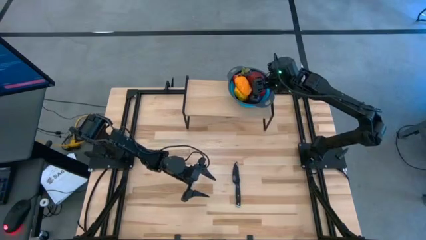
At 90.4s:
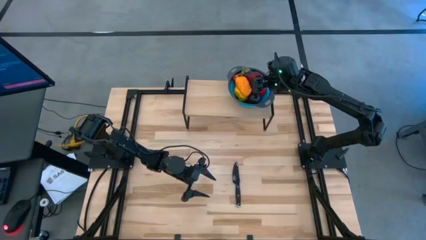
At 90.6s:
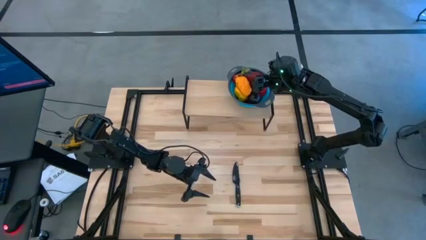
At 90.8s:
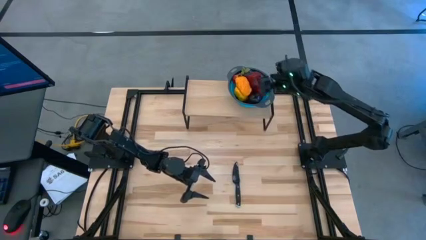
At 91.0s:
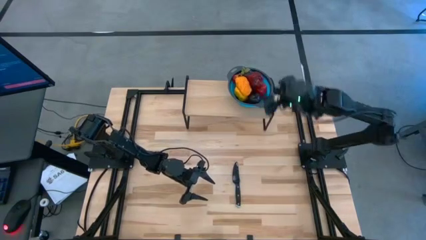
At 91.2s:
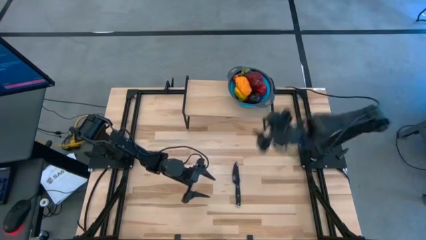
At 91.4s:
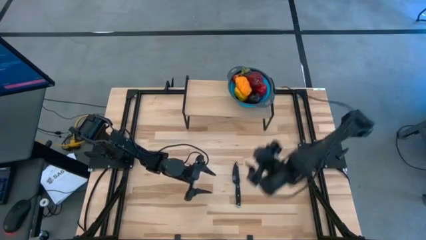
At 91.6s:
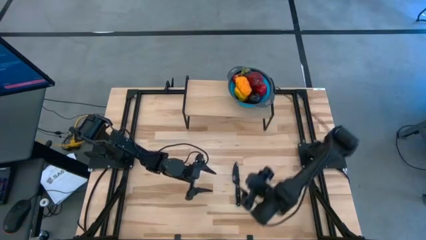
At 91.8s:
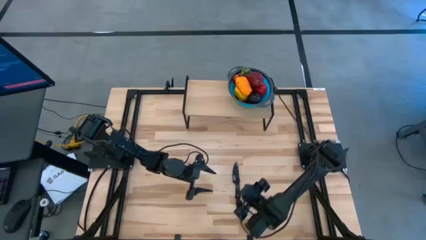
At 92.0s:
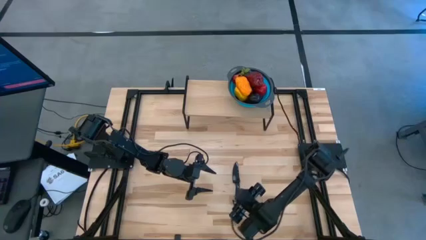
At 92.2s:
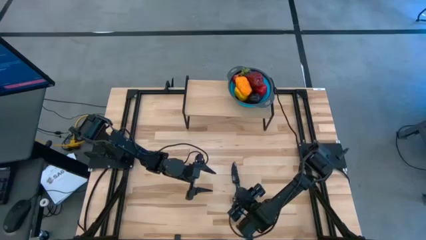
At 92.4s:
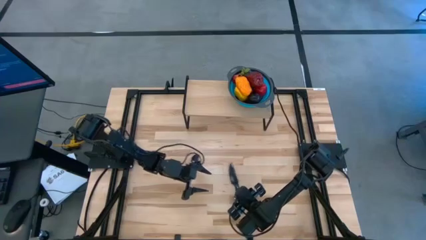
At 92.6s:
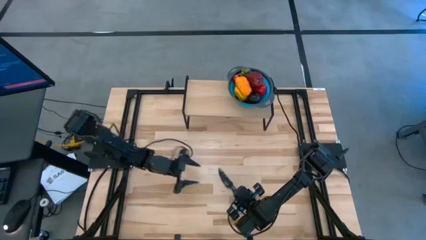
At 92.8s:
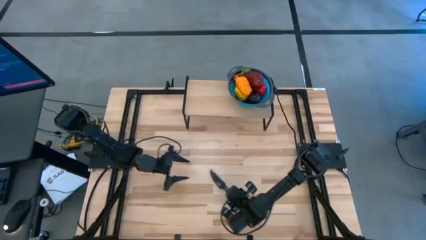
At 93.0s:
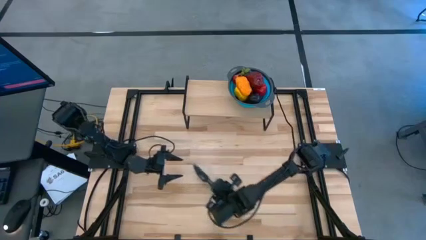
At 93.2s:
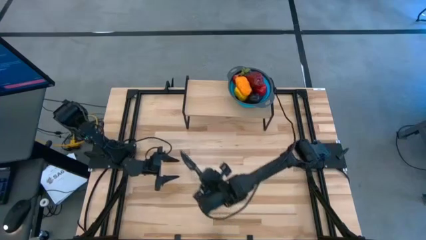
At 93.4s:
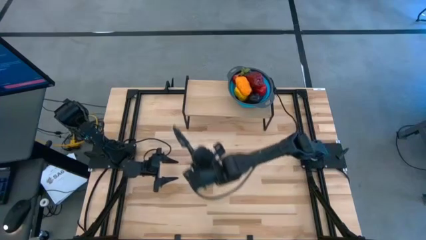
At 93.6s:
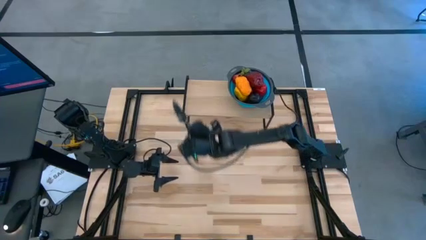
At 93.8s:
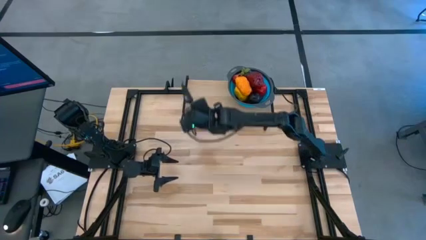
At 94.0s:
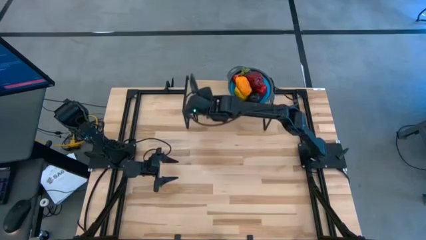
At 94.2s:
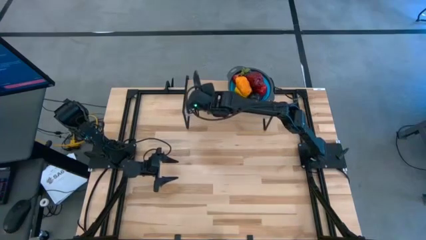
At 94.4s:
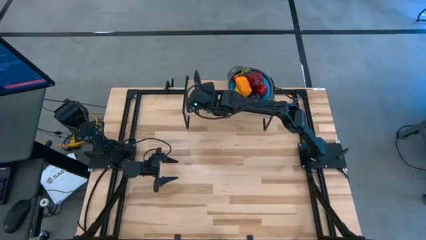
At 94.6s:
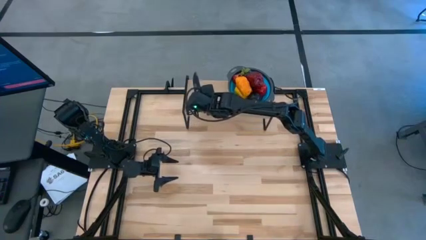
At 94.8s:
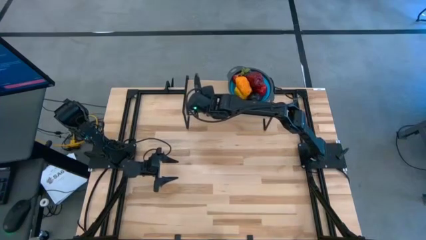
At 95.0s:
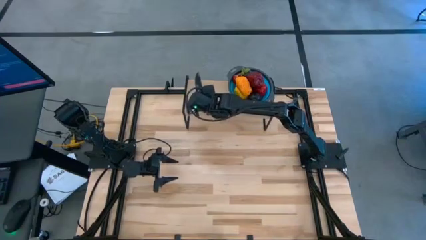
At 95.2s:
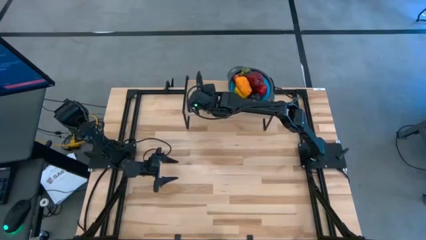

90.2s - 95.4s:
Task: Pick & Place Fruit
Put the black knife on the shelf

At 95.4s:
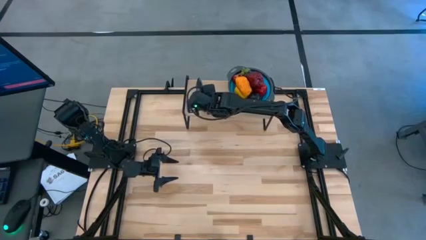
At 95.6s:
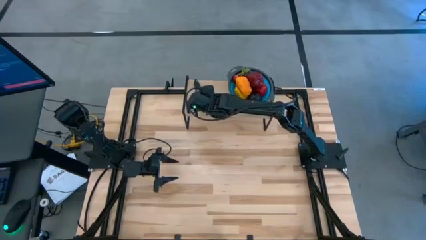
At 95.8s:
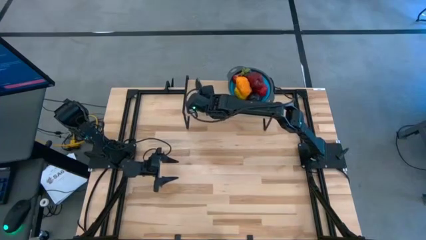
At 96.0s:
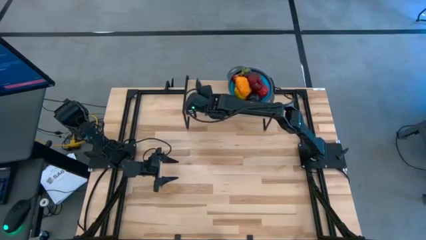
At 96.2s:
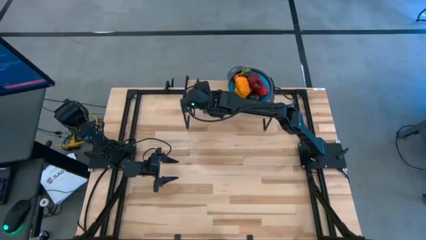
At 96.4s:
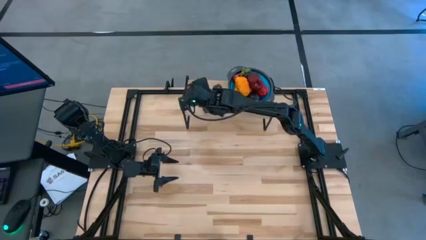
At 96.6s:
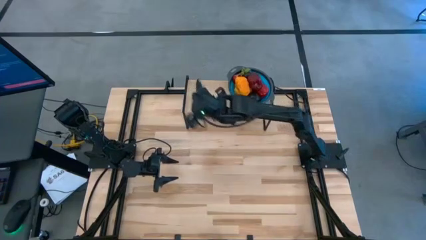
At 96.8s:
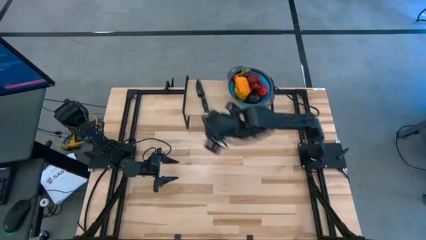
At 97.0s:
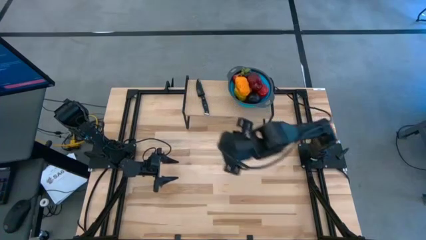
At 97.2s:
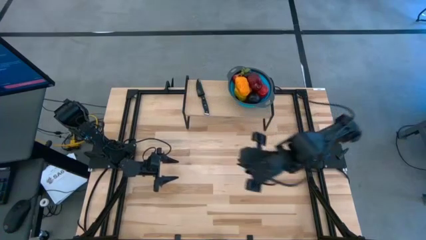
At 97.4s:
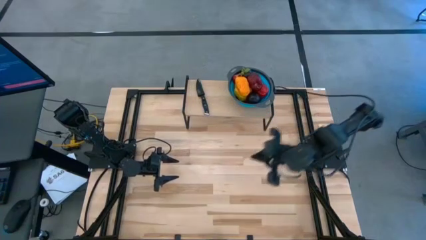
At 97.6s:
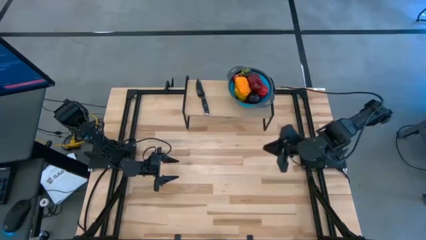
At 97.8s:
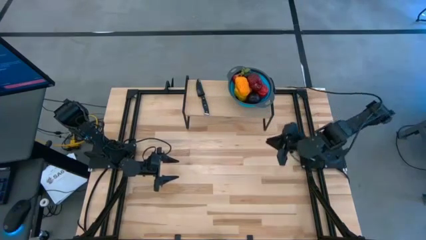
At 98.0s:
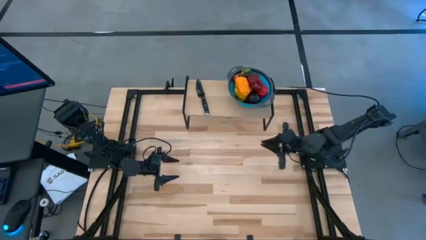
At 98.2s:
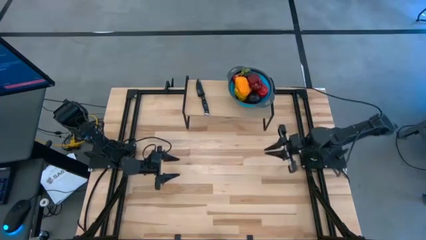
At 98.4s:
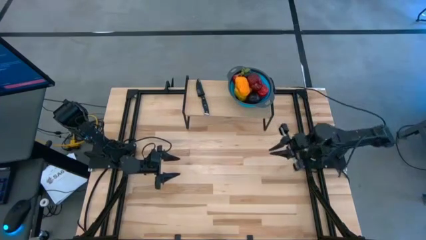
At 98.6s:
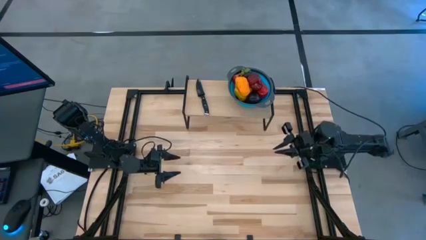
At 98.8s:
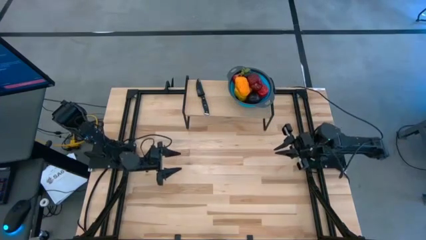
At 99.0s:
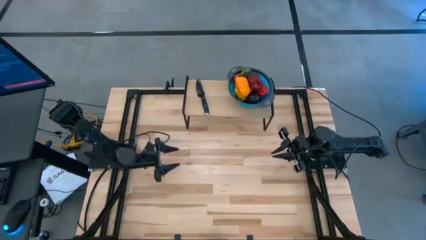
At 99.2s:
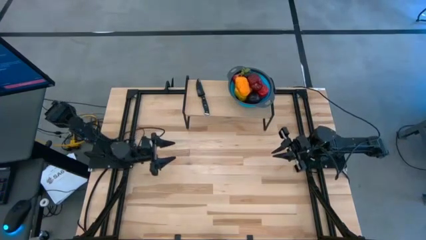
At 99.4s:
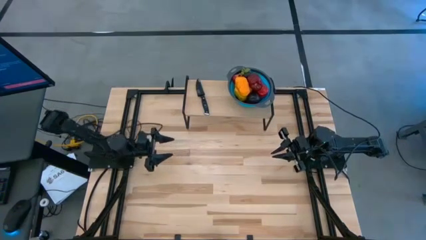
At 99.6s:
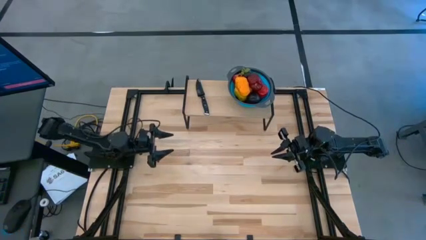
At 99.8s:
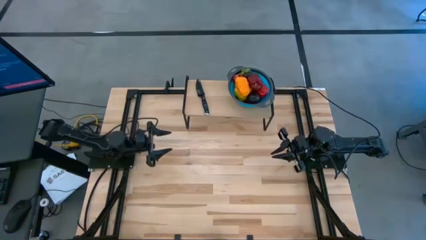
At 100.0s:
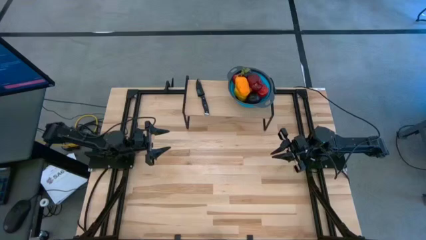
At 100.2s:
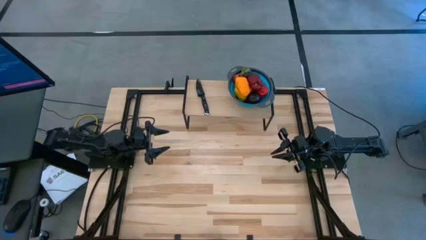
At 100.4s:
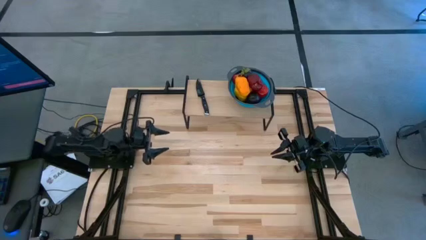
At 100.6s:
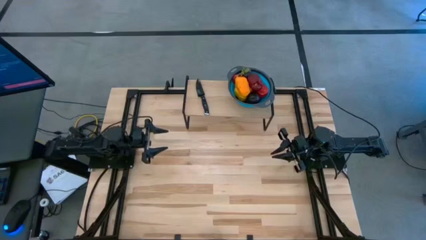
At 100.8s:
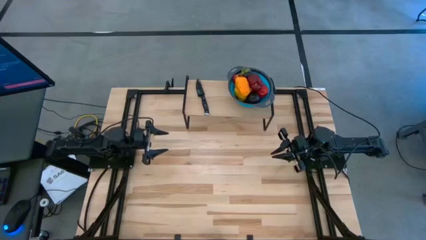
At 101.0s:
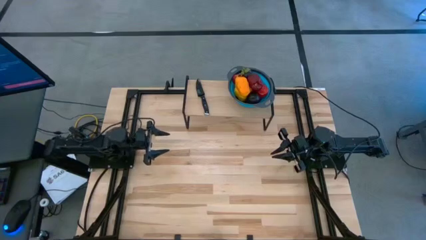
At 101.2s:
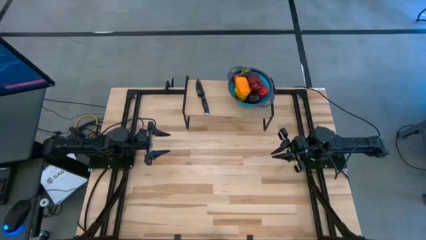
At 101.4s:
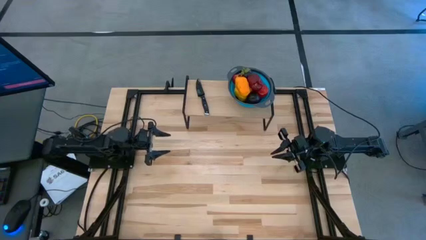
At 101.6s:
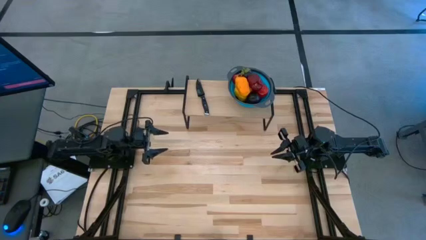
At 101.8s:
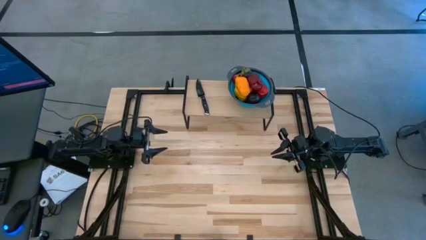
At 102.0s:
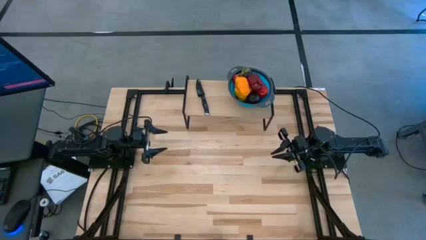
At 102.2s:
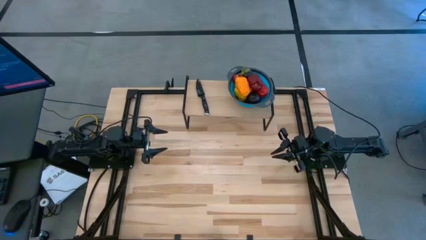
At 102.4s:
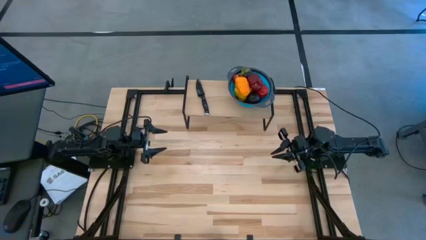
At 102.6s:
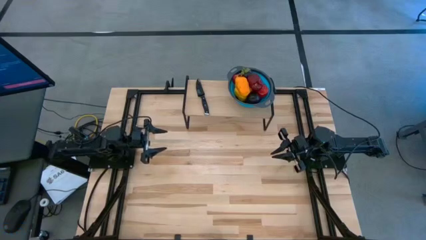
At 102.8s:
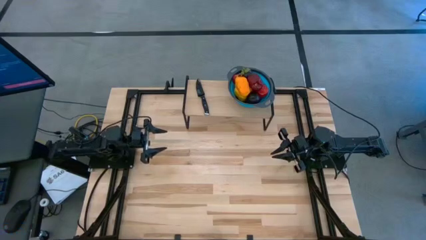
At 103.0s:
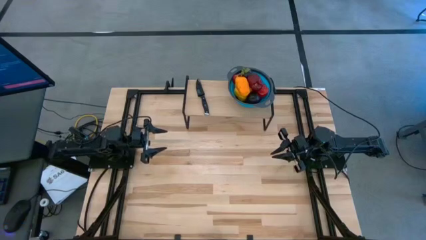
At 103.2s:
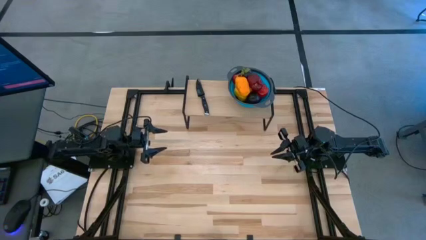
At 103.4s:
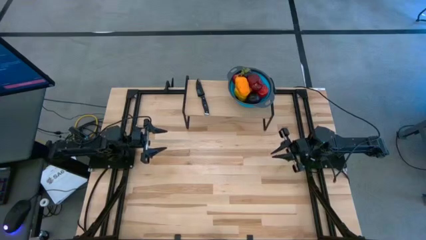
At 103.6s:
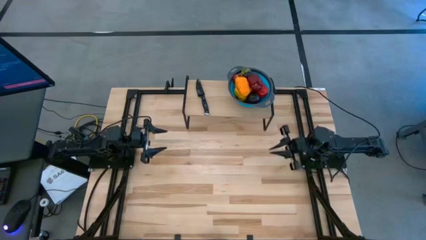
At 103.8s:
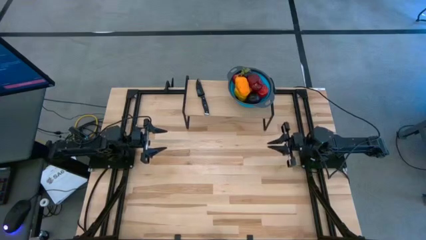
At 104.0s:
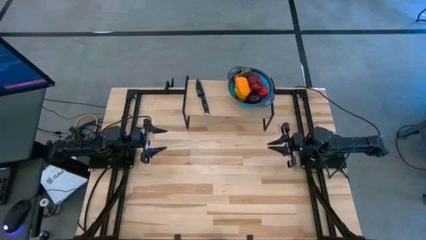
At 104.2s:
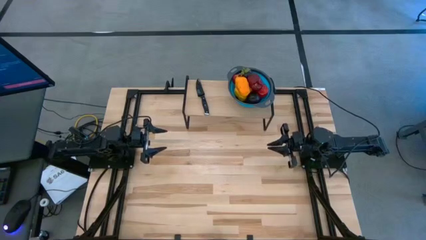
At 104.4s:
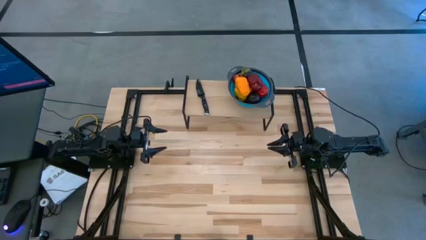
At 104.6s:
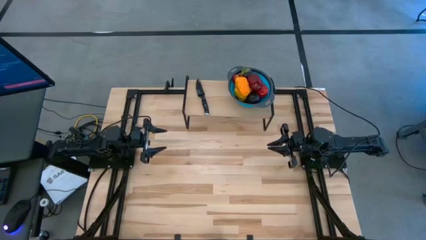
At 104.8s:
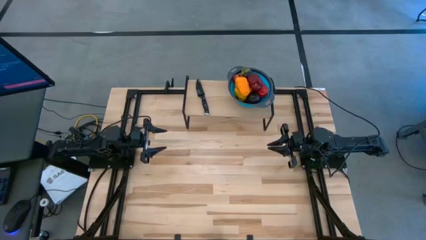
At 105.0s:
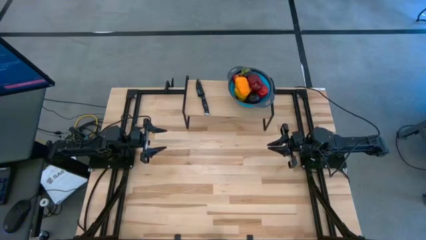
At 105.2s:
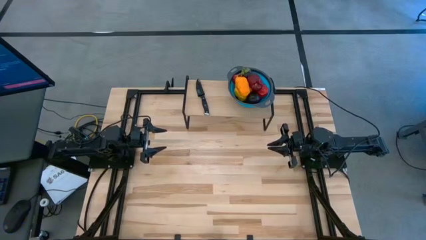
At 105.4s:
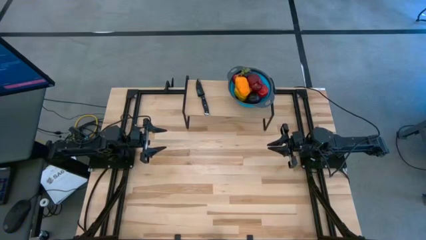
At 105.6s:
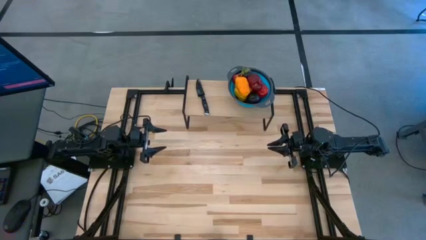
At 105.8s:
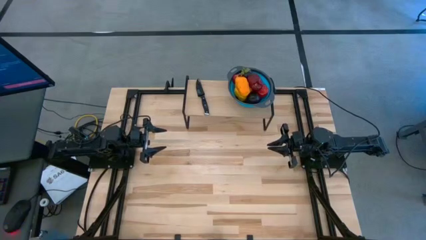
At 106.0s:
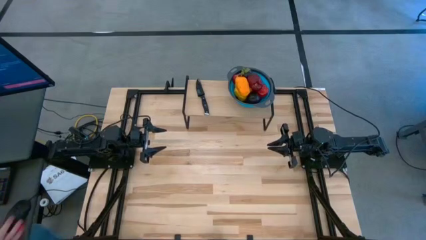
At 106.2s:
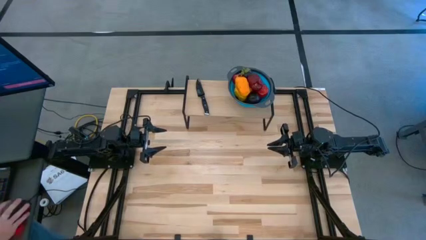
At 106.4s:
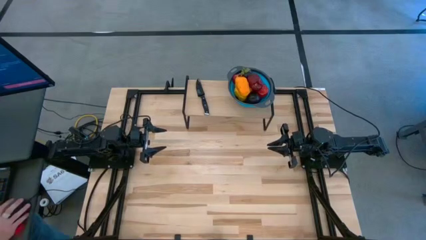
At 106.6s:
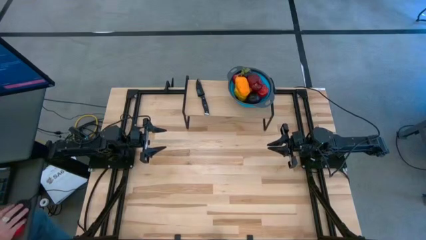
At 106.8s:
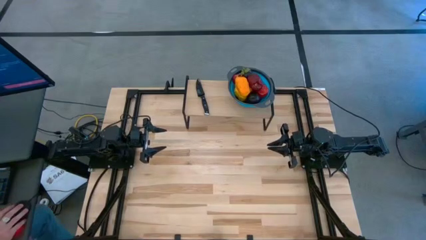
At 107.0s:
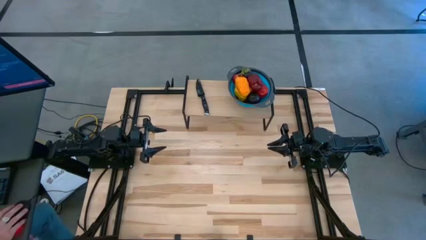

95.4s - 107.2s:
Return to Home Position
